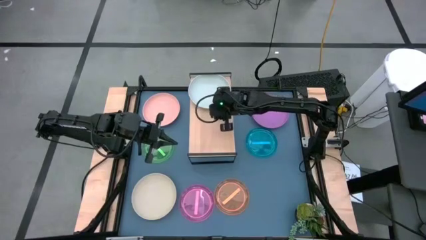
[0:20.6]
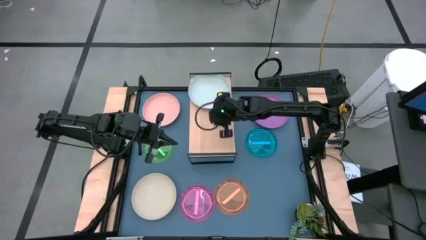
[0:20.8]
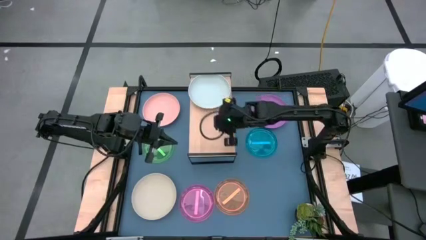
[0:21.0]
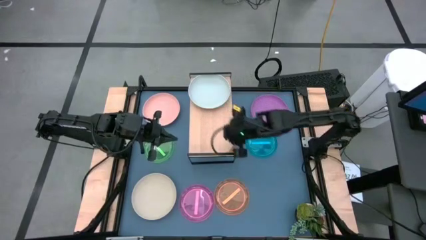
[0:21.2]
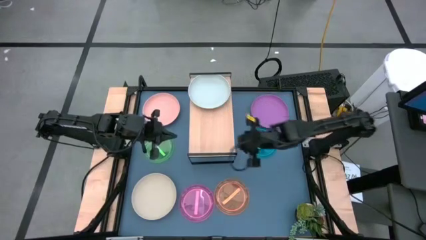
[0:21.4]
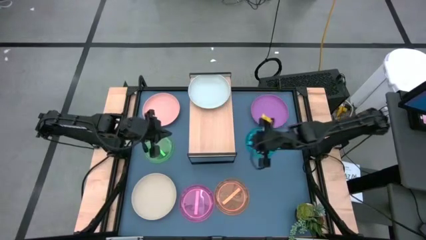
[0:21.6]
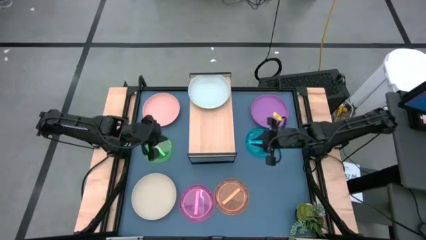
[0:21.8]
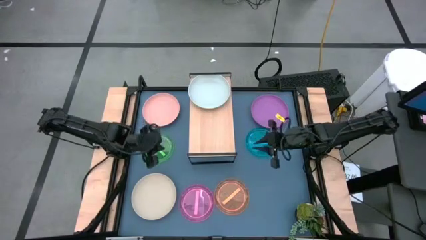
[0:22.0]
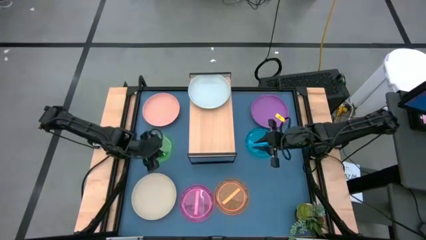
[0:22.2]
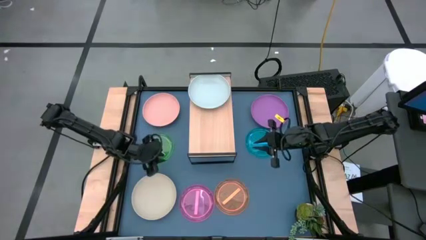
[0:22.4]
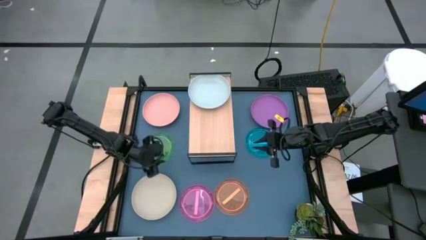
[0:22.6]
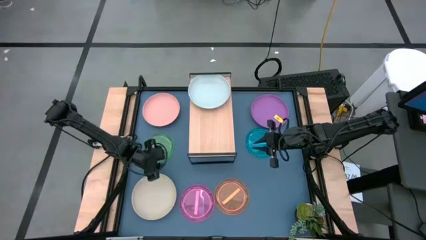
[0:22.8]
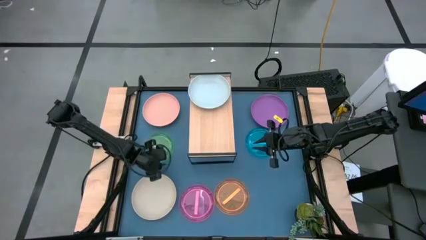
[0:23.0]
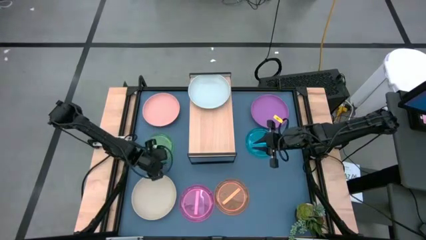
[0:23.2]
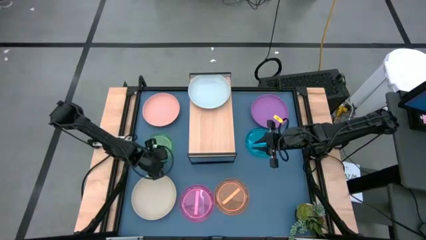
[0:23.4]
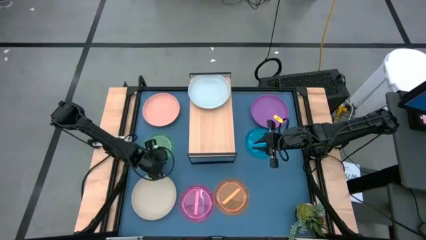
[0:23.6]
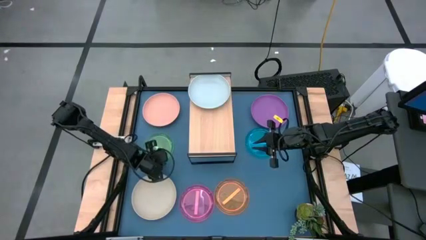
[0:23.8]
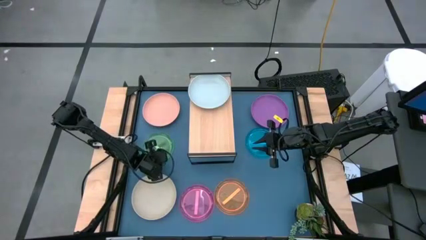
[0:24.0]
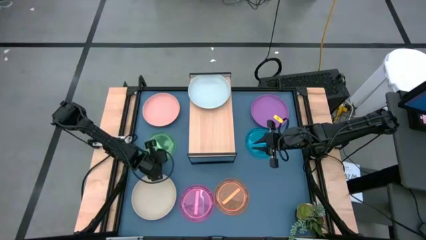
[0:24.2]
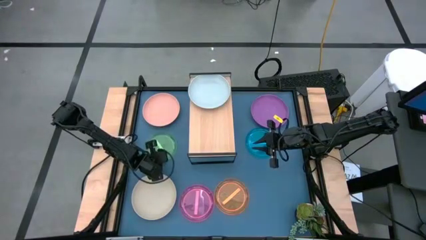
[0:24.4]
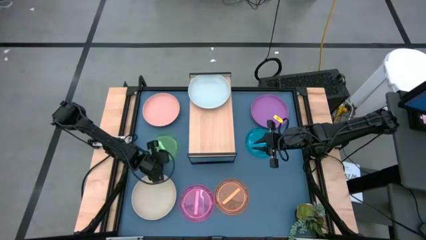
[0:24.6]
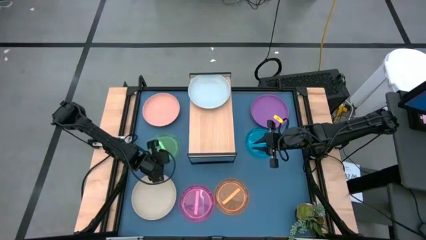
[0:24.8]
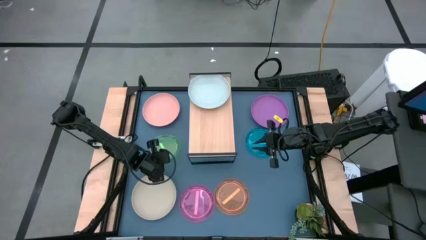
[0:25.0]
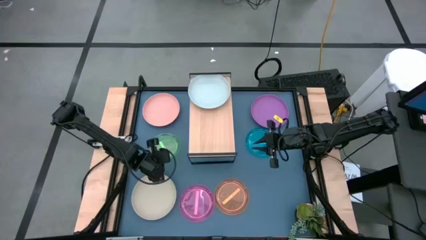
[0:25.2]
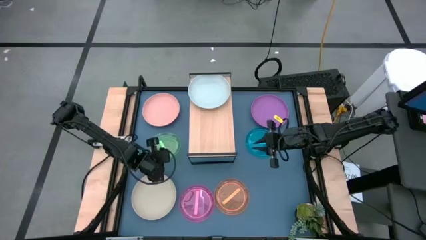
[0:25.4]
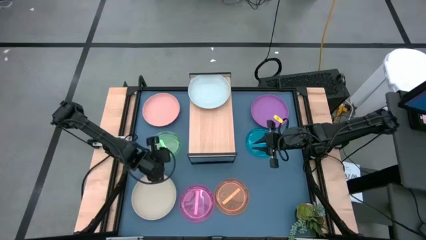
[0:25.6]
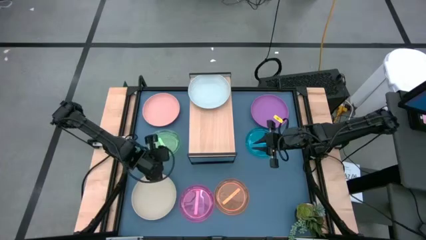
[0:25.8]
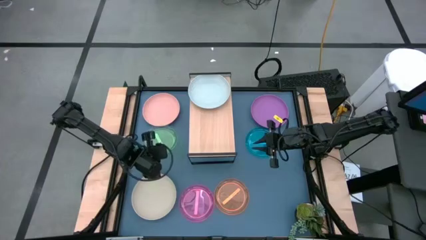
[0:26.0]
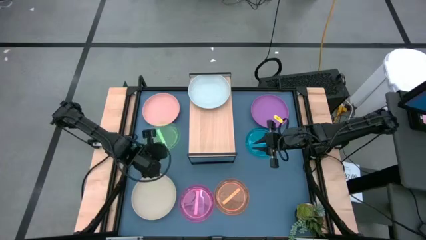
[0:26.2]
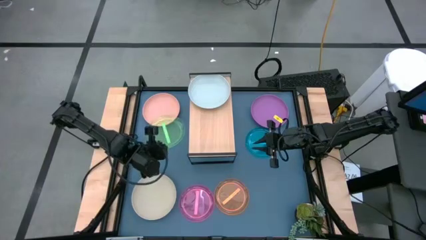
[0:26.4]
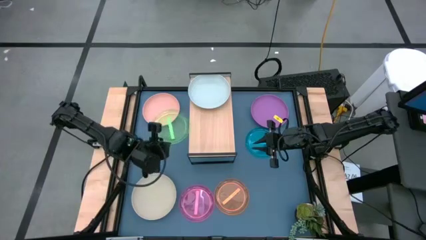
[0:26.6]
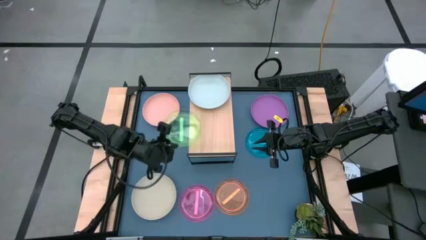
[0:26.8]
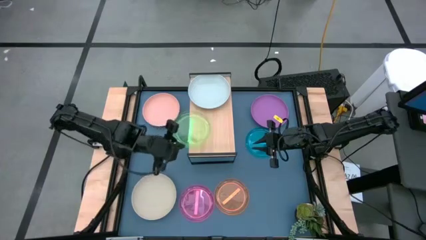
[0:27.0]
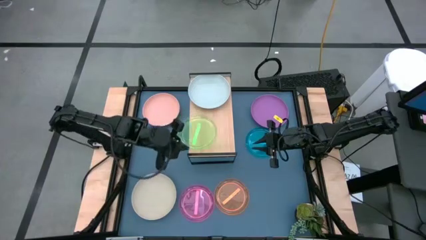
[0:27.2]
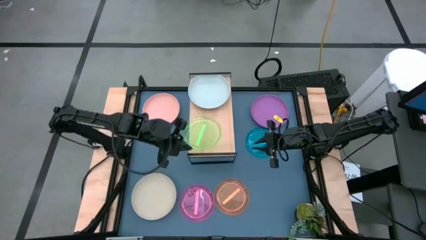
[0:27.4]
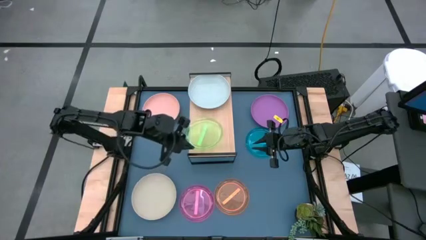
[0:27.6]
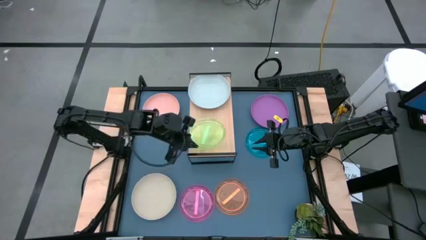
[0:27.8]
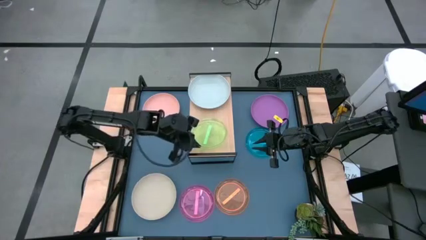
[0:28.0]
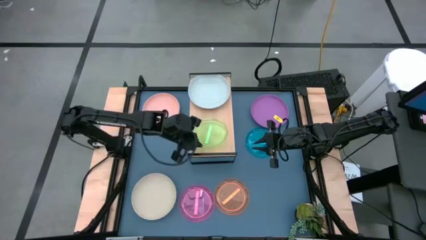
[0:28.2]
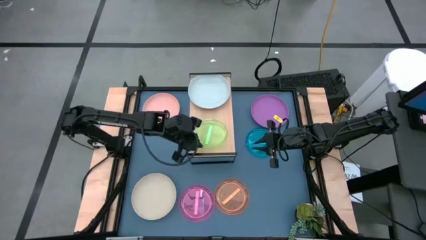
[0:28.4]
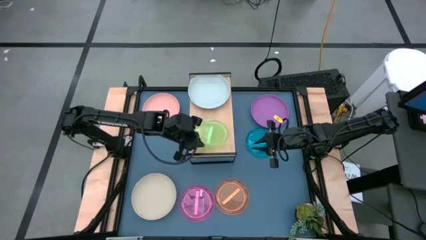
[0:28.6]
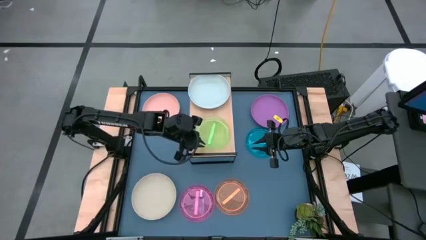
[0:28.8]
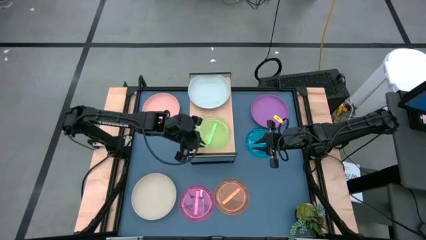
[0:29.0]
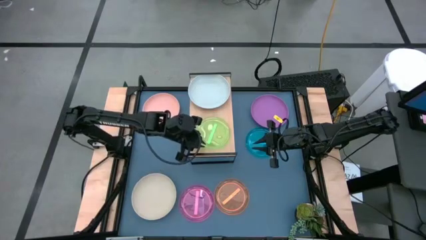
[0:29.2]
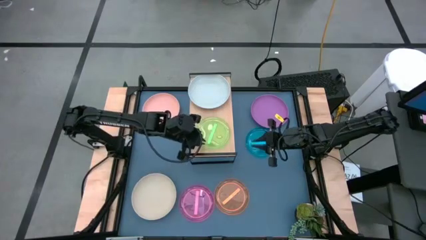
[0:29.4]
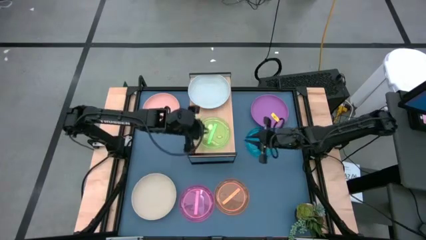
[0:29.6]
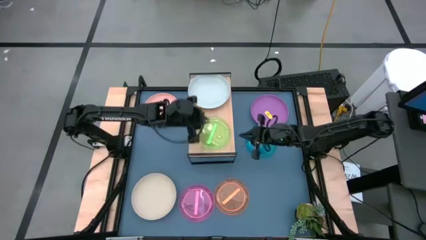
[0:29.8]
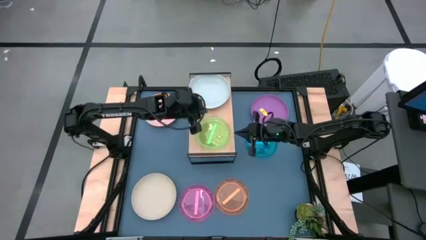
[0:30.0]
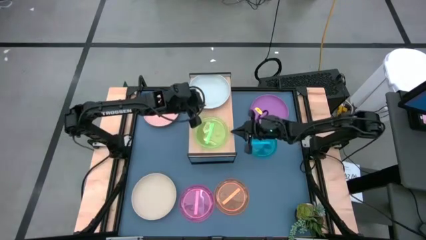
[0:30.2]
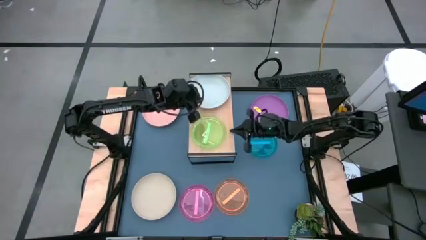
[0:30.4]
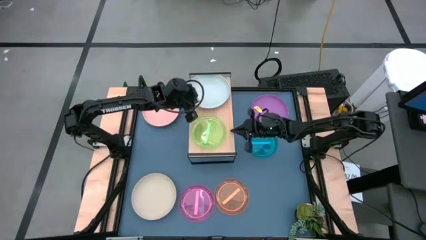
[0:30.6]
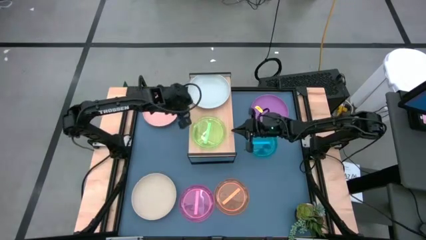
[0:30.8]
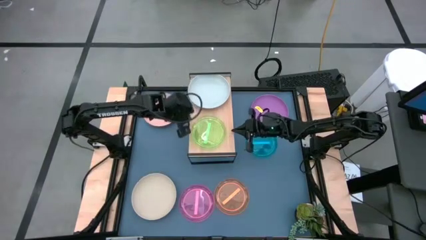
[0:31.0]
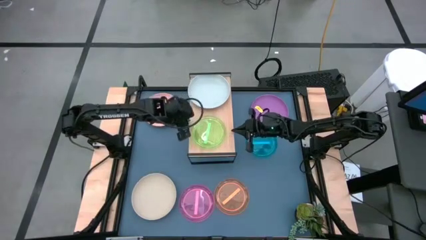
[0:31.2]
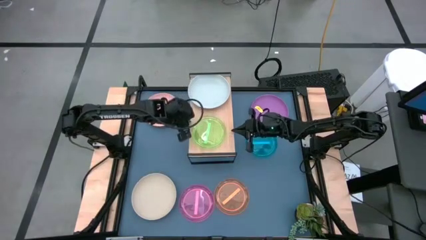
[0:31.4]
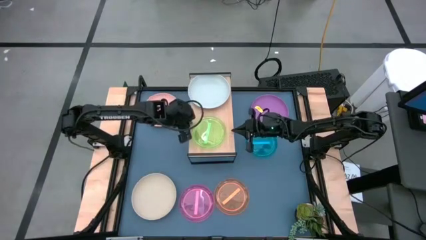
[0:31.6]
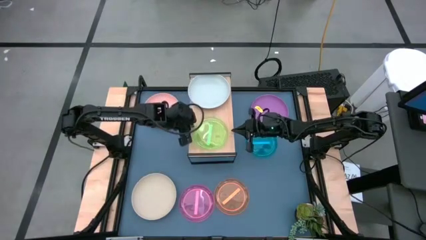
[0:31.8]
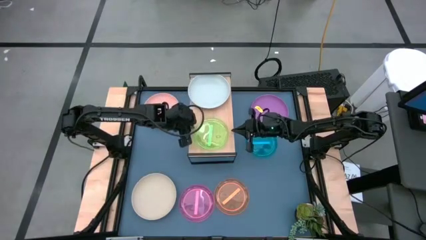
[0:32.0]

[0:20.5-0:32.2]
Task: Place and stack plates onto a shelf
Put the green plate on the shelf

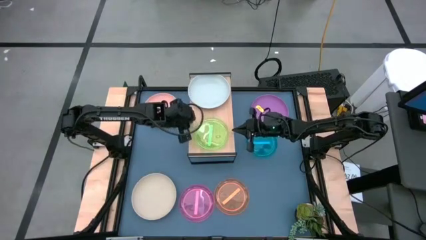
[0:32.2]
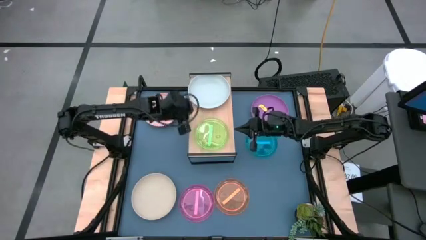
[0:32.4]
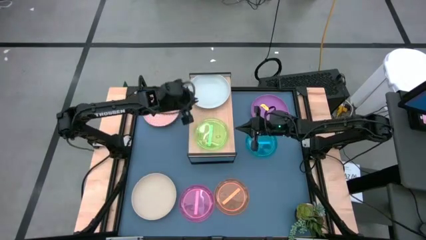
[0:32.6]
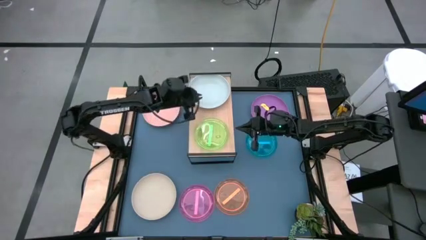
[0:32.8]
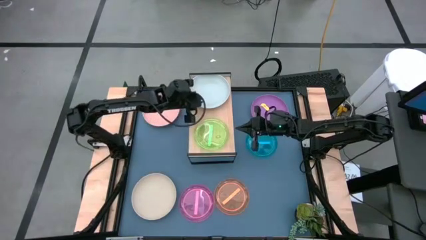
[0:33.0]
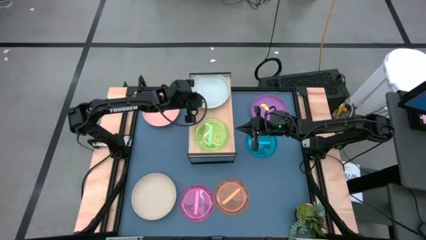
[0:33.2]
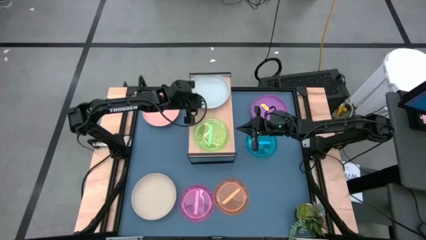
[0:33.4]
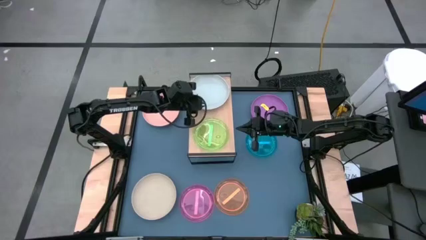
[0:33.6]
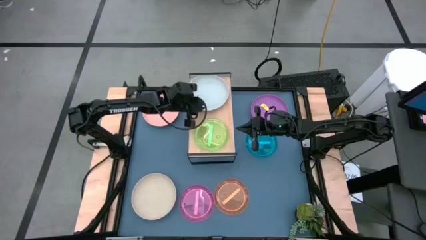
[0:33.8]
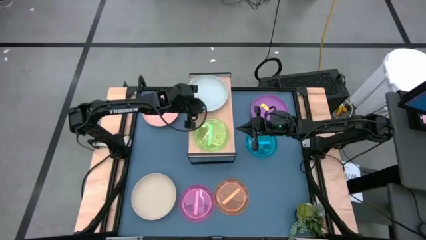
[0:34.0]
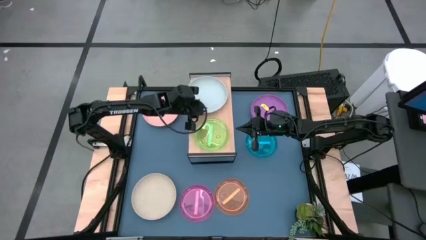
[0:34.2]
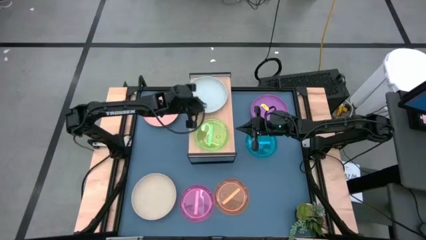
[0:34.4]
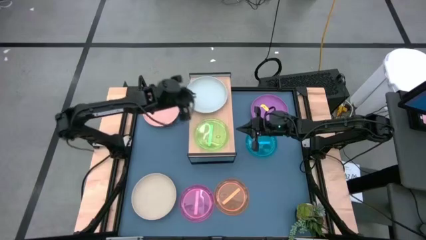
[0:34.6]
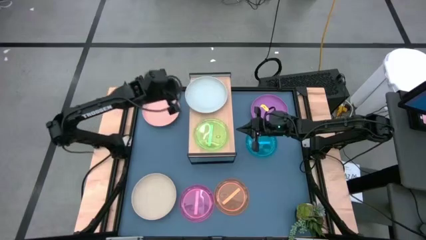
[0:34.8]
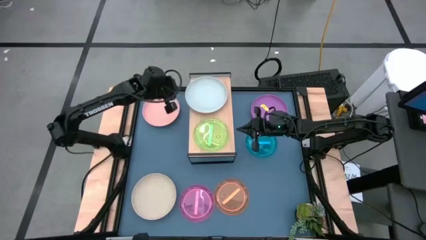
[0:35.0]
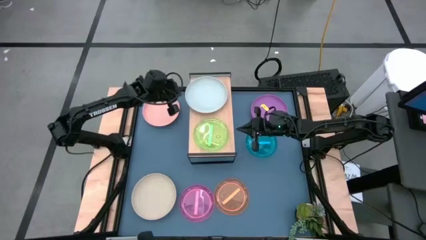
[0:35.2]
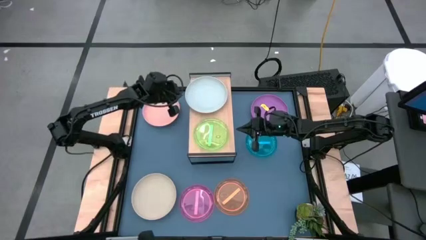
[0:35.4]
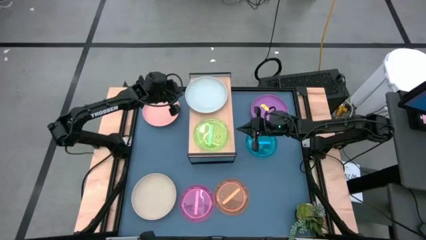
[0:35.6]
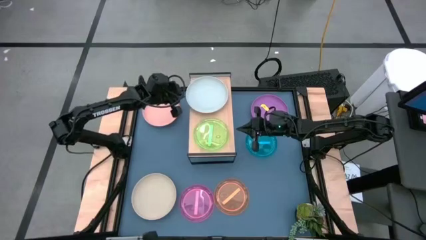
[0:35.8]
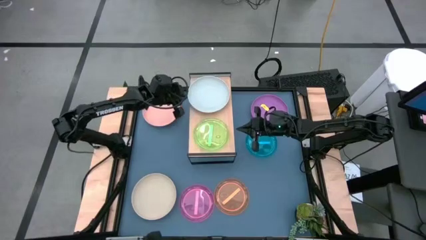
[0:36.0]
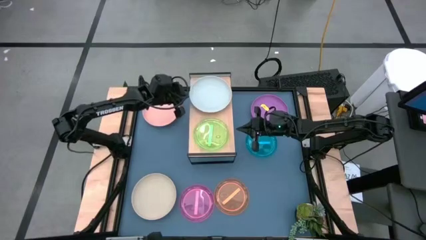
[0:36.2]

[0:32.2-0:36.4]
Adjust the gray plate on the shelf
